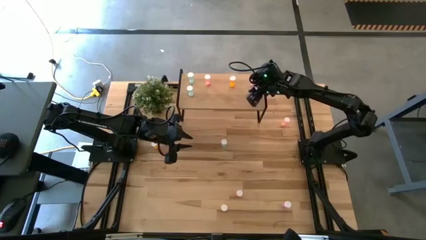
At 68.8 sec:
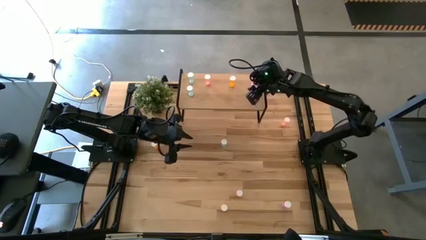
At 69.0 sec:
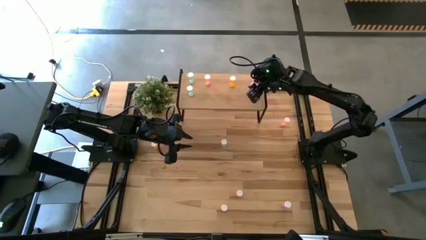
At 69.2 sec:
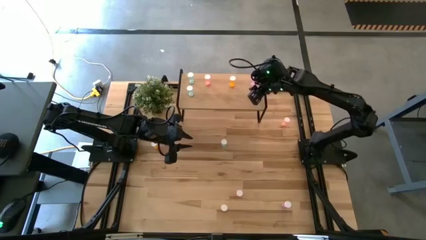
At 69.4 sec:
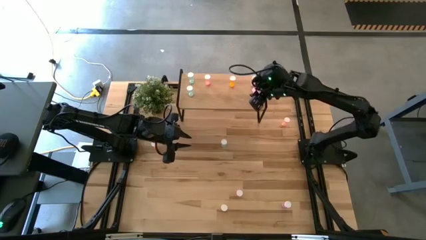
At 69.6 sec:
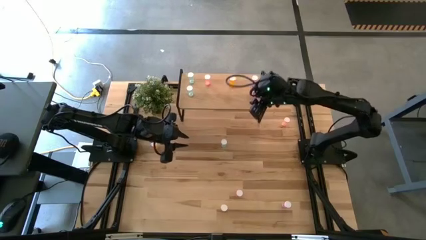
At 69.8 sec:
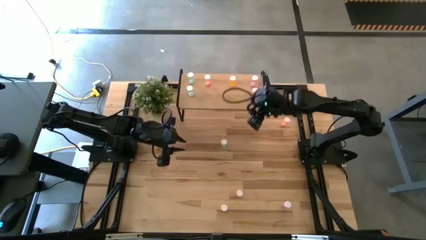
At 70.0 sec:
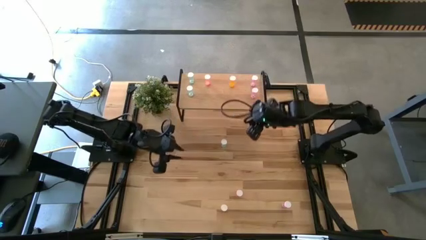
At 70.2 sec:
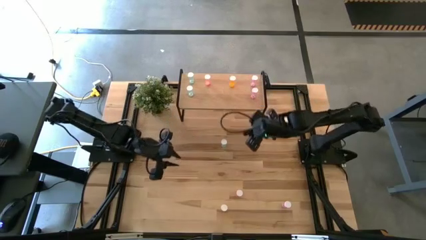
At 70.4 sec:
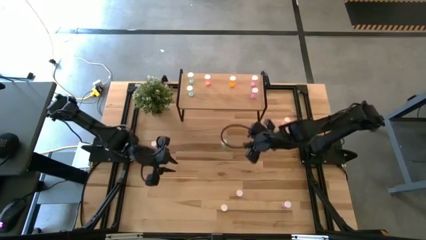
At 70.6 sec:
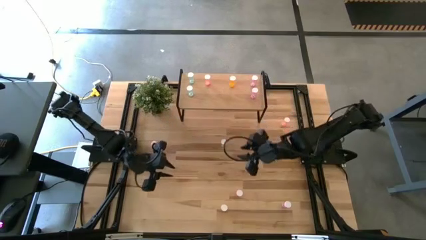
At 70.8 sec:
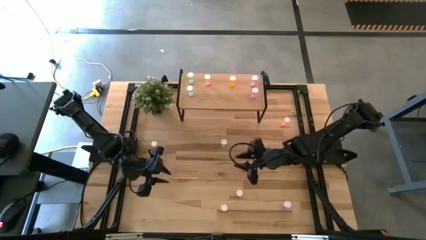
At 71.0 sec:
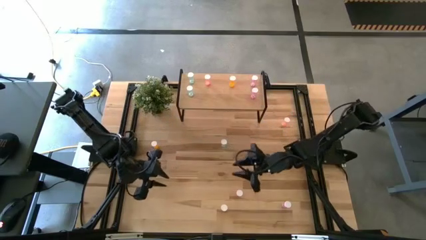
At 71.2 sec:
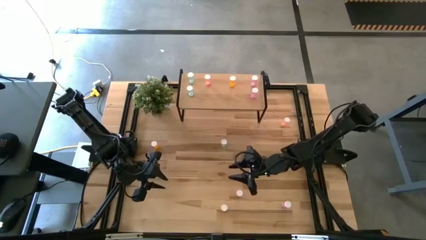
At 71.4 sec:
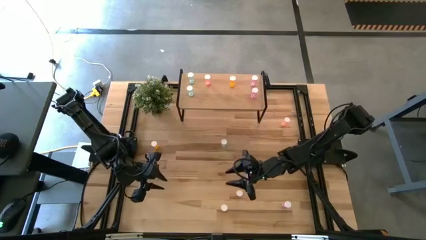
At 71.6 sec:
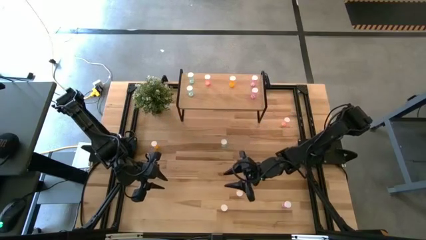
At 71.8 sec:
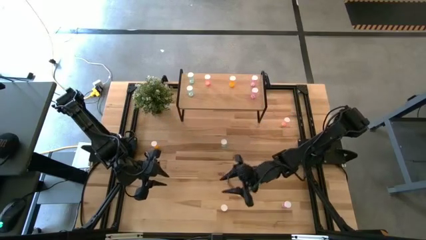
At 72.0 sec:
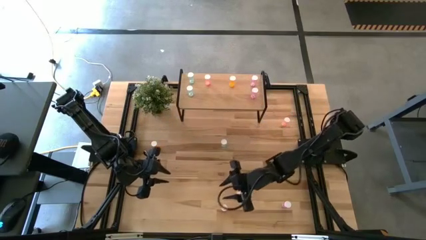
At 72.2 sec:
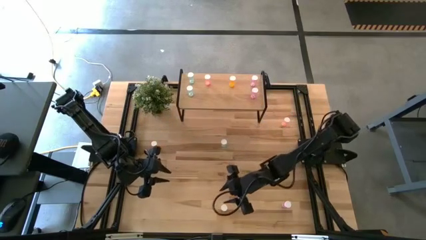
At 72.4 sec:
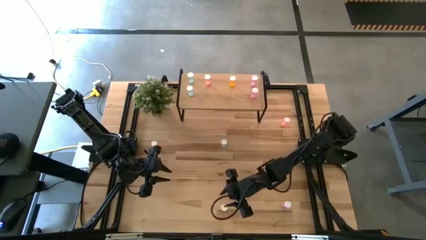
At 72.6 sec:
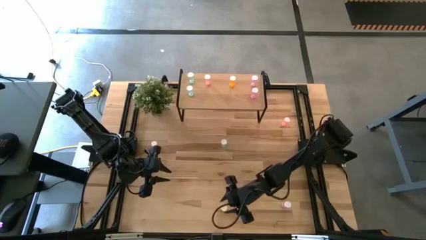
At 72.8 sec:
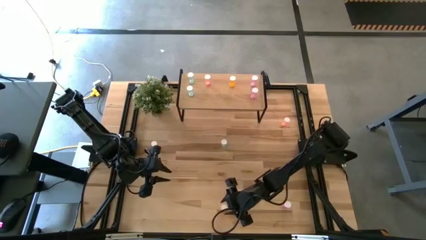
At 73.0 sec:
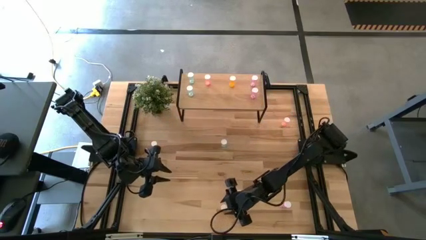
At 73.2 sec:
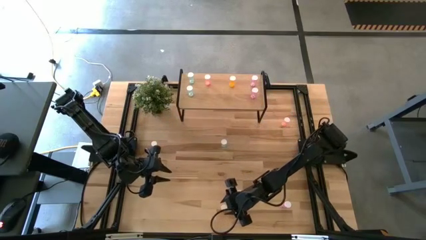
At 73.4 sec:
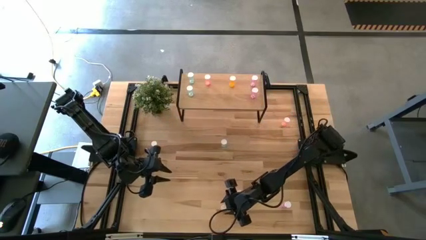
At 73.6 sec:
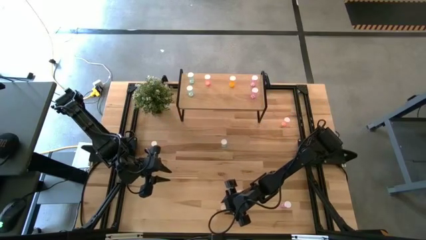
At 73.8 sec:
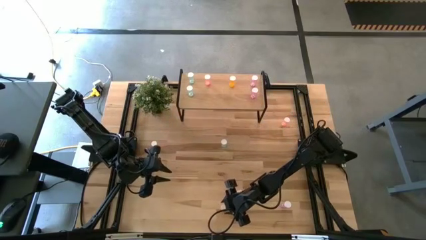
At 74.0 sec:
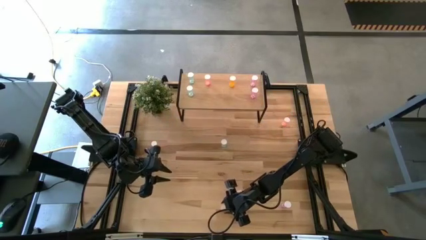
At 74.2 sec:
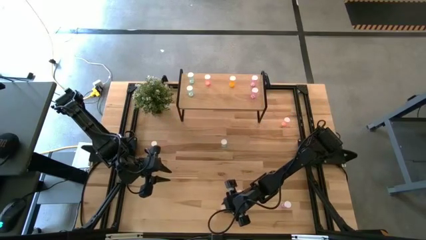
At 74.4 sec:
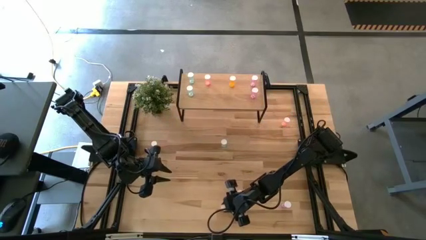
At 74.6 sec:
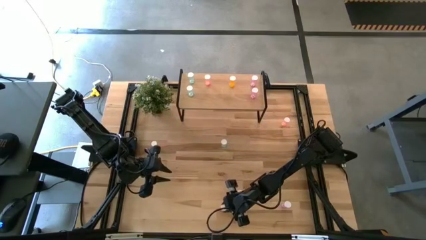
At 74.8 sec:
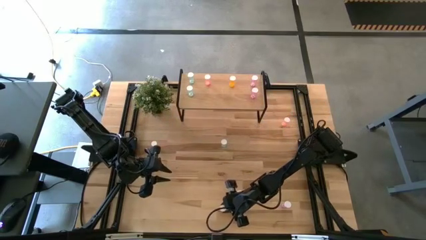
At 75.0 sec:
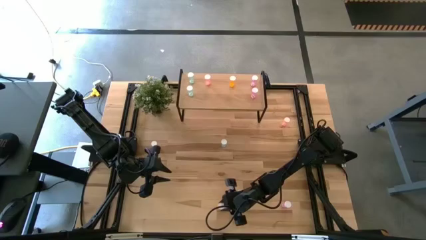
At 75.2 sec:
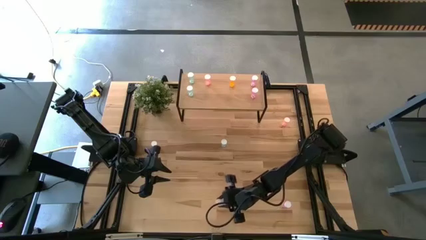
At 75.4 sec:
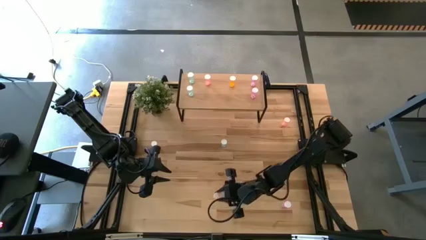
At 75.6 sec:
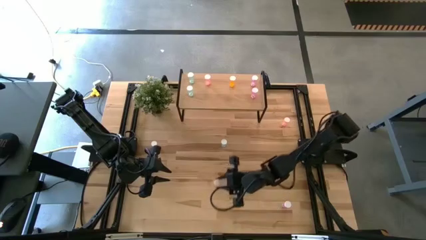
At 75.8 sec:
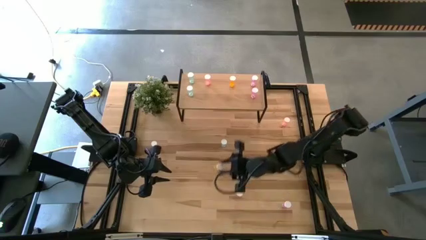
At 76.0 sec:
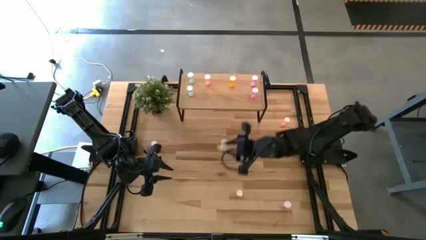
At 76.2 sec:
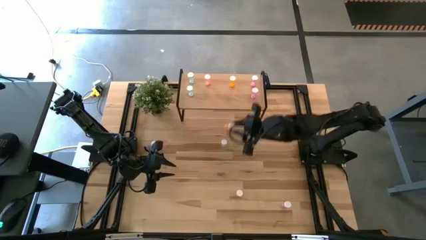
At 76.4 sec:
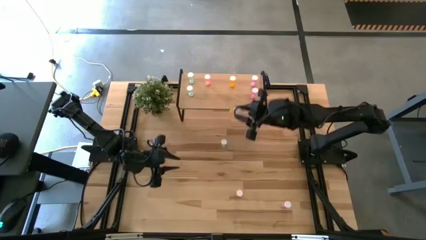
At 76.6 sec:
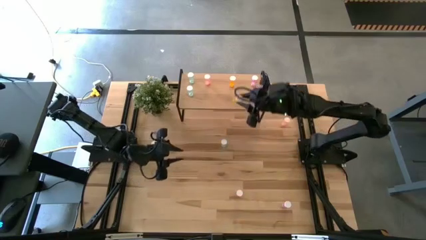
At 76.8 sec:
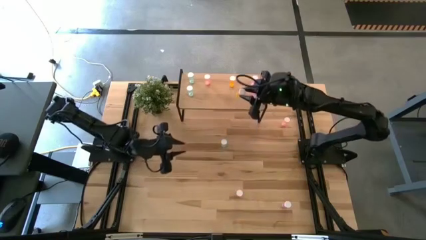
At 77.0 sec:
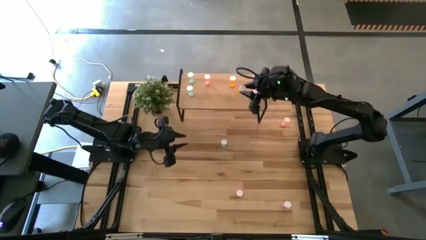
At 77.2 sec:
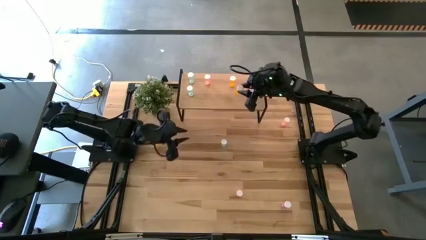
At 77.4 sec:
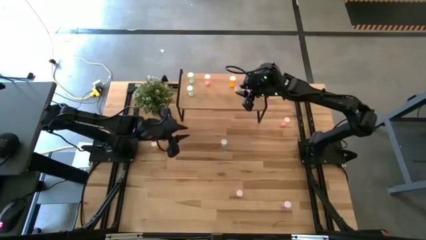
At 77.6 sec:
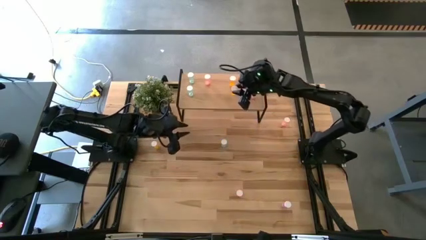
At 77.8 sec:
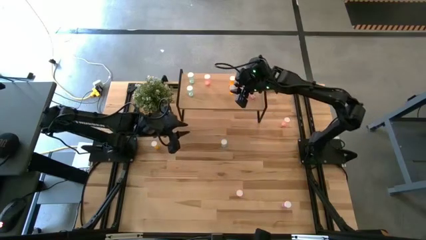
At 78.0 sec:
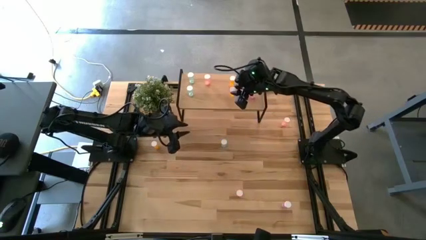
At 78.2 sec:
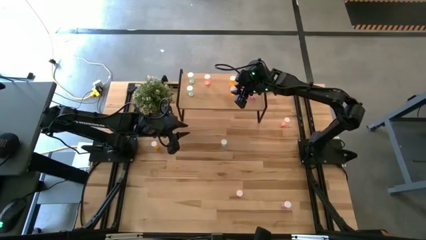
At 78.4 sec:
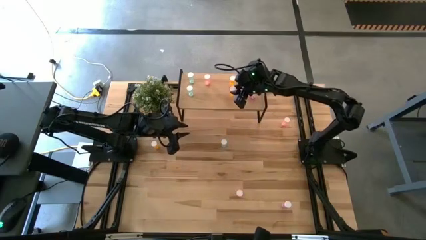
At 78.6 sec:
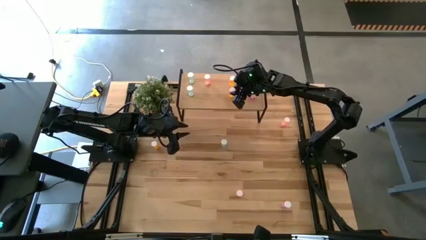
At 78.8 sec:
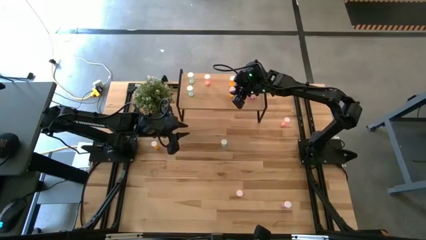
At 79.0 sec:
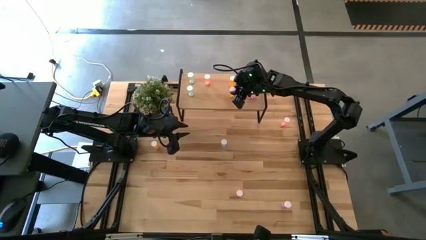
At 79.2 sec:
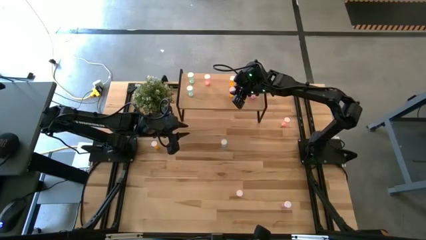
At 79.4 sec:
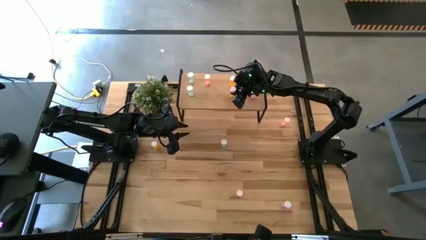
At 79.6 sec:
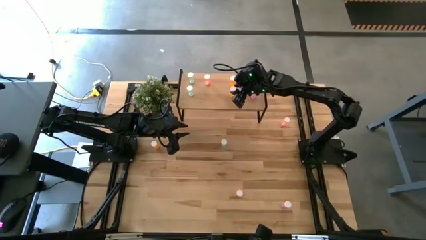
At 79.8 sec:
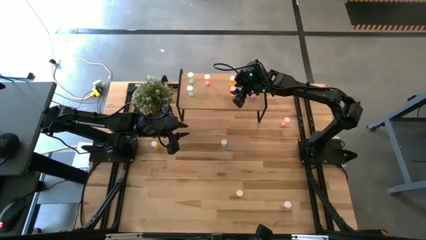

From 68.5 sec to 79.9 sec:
Task: Pick and place medicine bottles onto shelf by color
Put the bottom orange pill bottle on the shelf aligned with the other orange pill bottle
